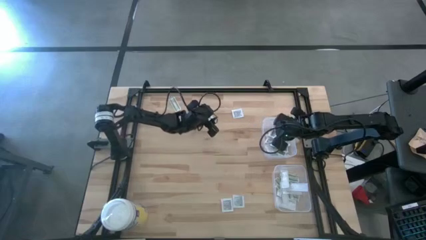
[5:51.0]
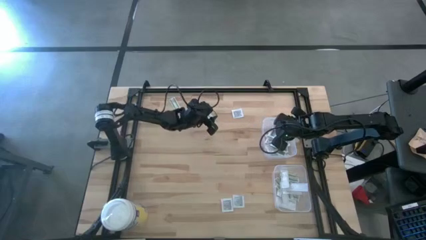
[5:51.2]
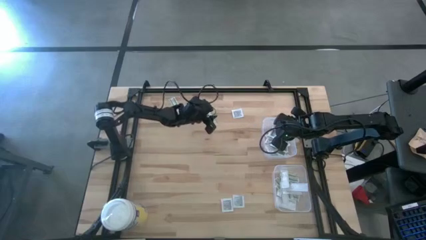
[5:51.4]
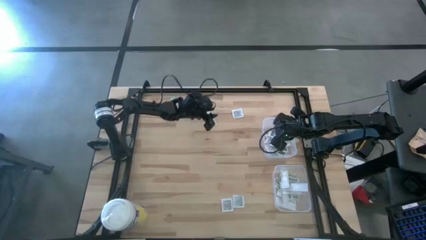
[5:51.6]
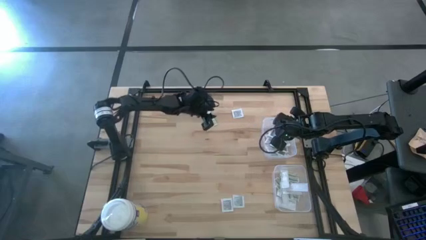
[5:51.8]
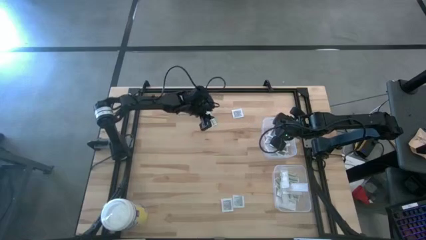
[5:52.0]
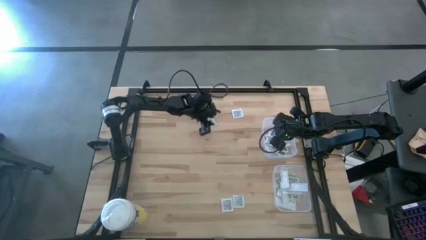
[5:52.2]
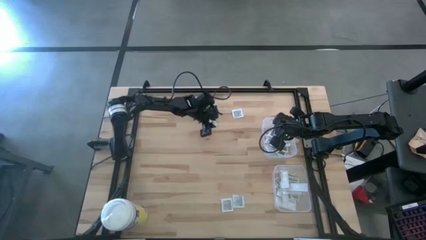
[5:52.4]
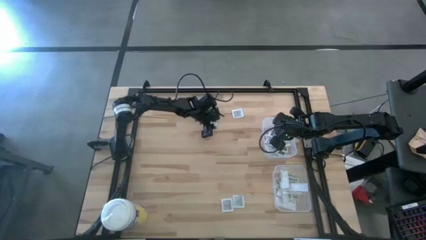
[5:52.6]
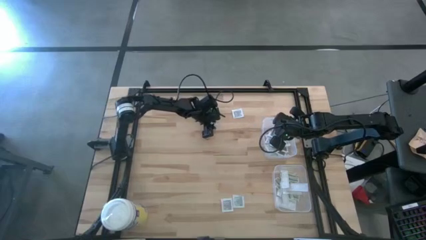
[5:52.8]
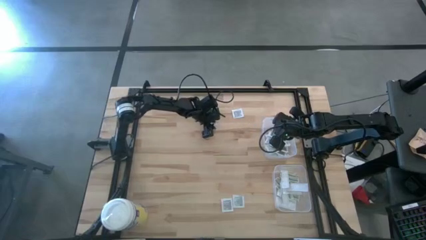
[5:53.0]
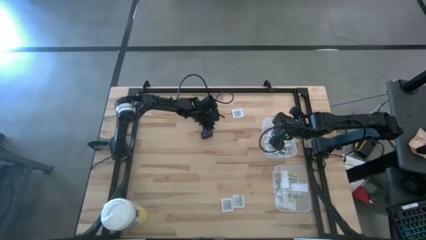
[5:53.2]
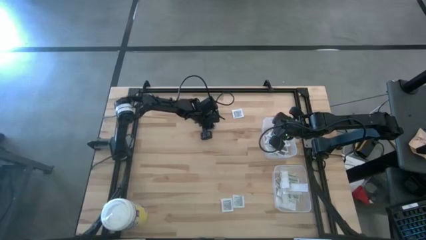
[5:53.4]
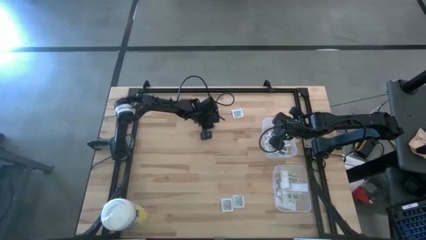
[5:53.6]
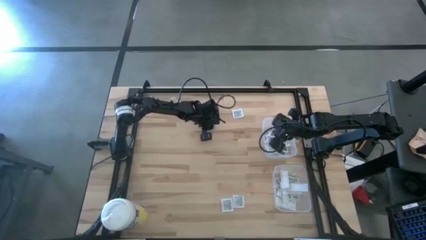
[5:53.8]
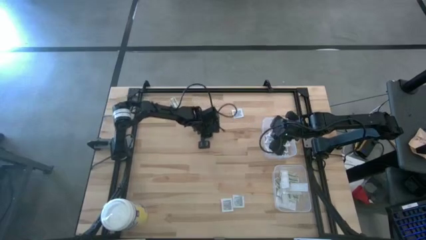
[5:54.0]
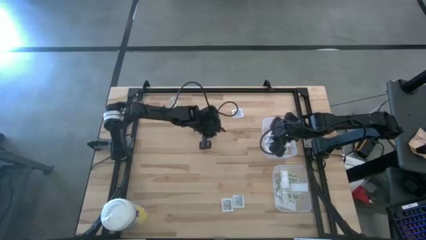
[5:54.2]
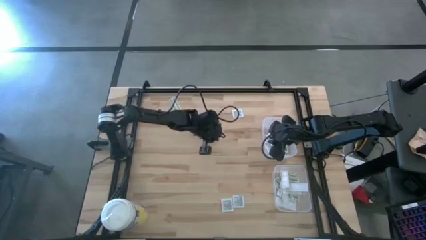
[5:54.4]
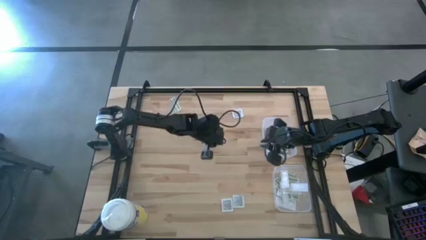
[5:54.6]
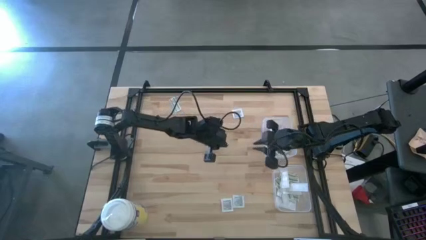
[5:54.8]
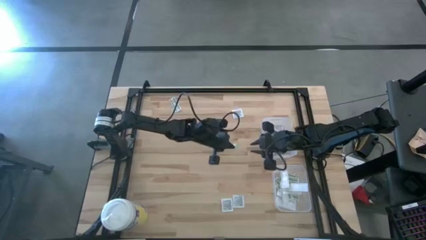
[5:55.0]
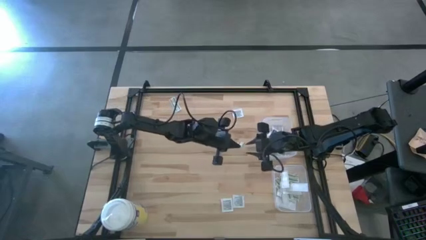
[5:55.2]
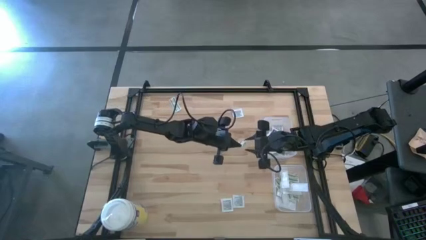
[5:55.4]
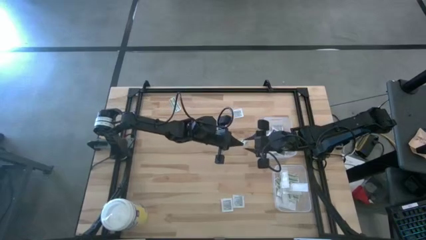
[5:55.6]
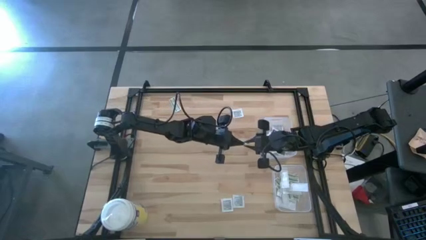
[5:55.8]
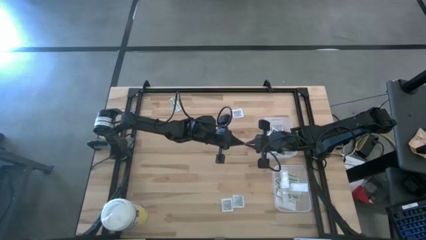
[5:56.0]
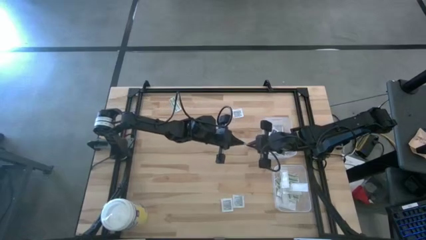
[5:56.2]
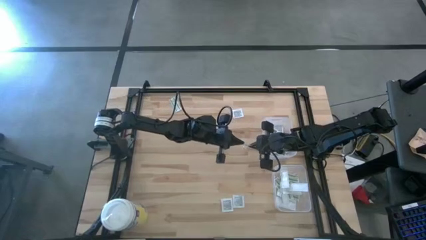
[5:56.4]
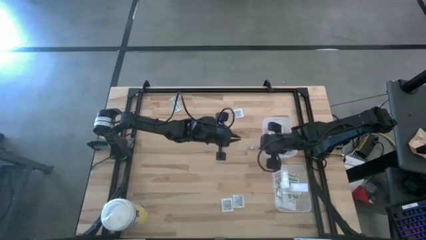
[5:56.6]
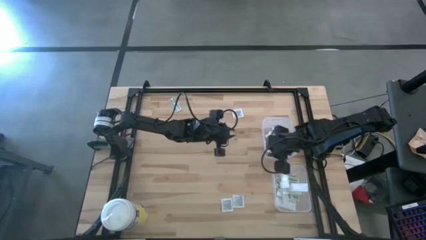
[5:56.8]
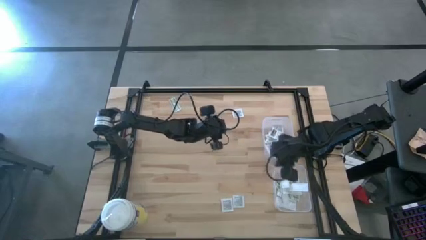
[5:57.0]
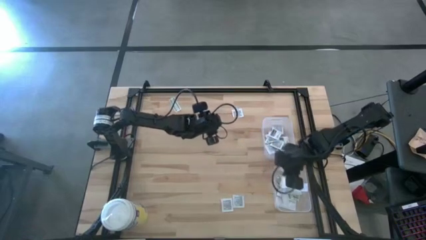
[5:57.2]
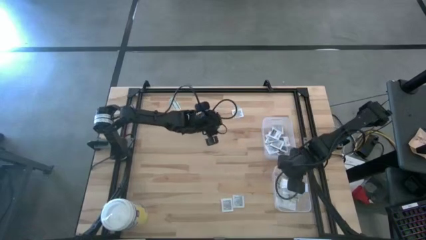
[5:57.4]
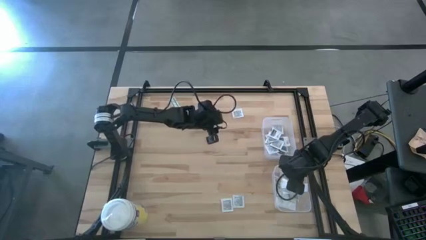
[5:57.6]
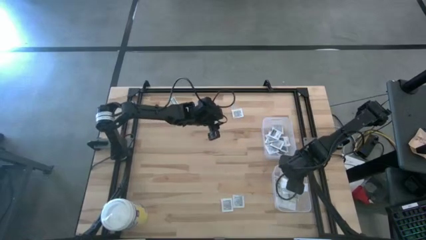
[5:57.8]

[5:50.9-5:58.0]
Task: Pick & Place First Aid Supplies
Put the right bandage pack into the bottom bin

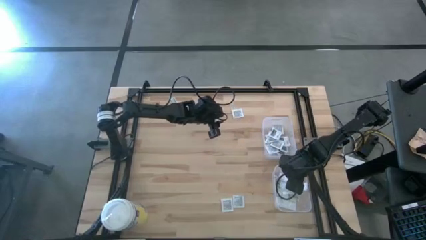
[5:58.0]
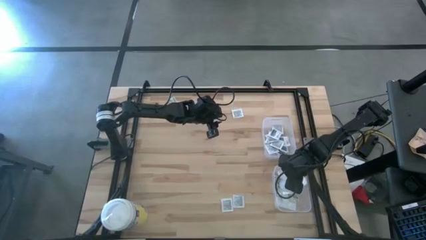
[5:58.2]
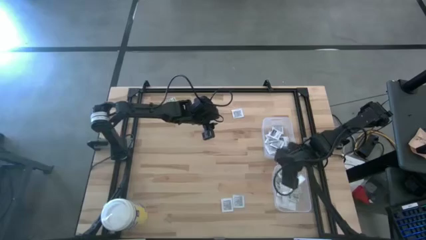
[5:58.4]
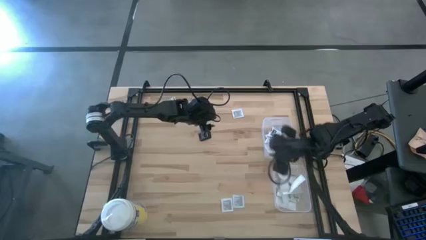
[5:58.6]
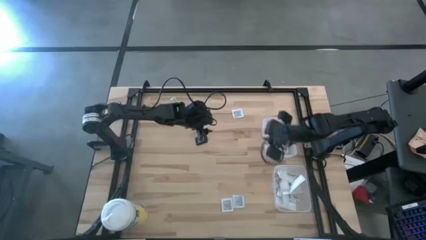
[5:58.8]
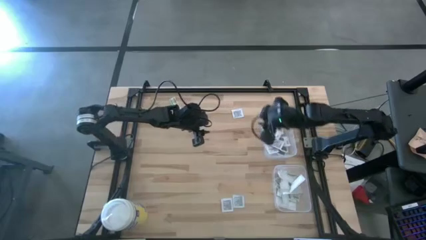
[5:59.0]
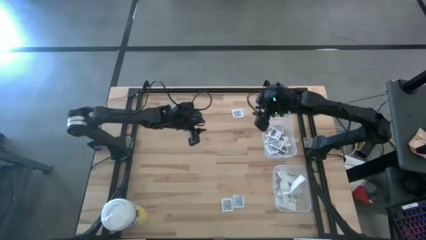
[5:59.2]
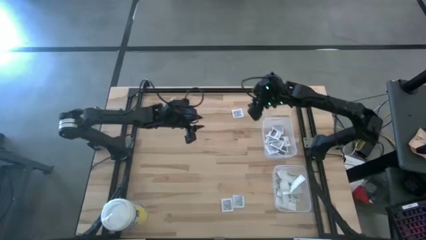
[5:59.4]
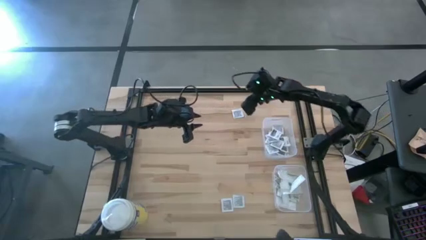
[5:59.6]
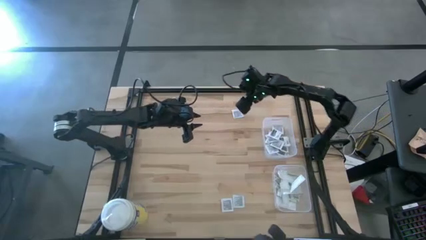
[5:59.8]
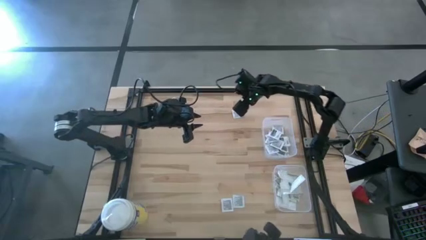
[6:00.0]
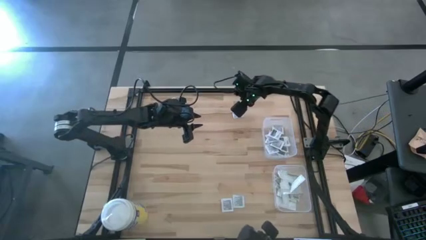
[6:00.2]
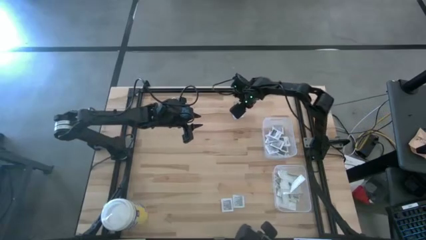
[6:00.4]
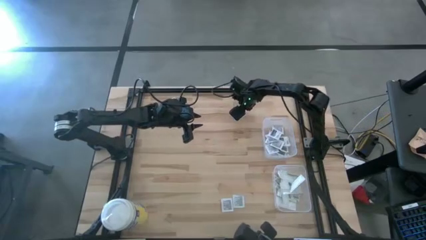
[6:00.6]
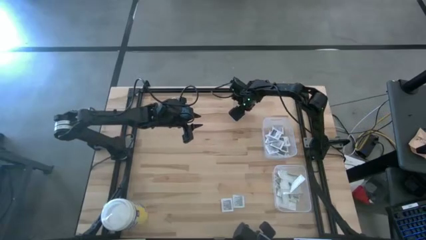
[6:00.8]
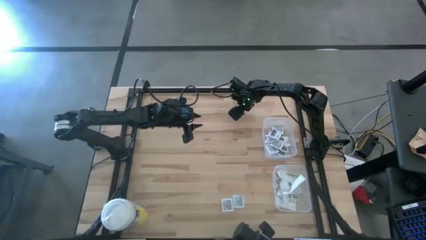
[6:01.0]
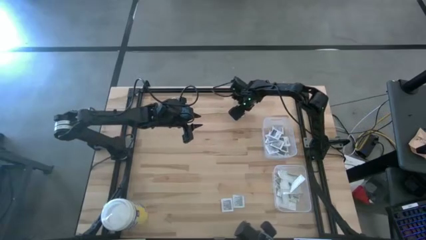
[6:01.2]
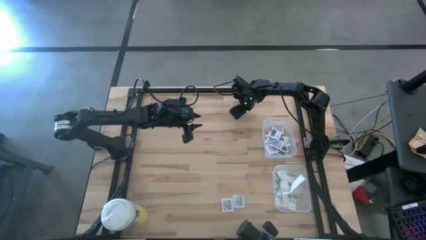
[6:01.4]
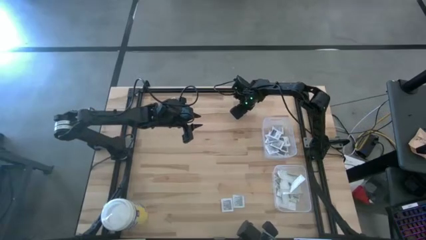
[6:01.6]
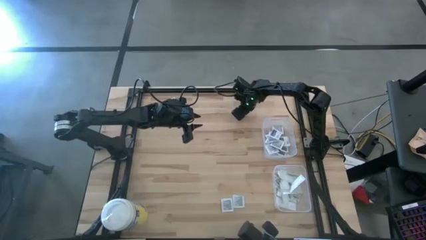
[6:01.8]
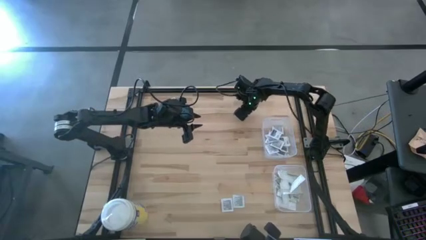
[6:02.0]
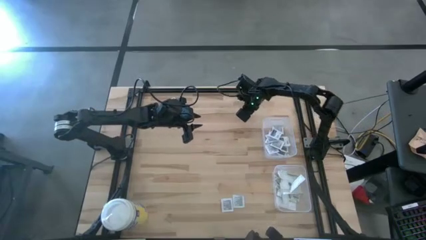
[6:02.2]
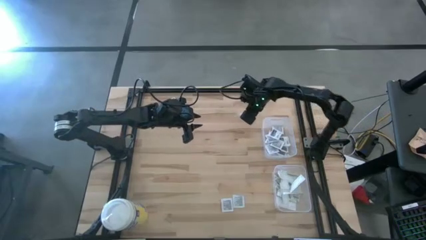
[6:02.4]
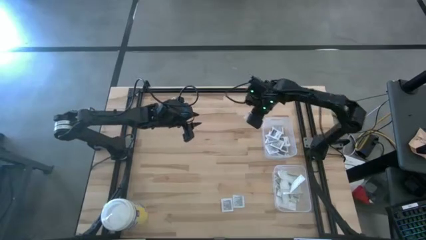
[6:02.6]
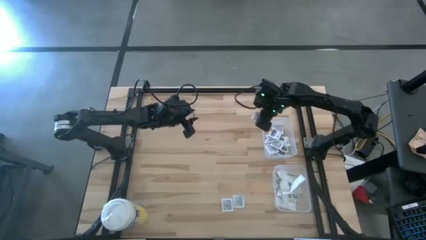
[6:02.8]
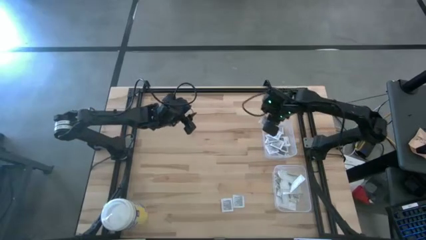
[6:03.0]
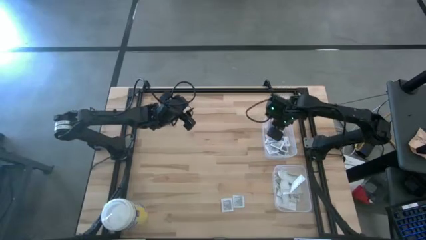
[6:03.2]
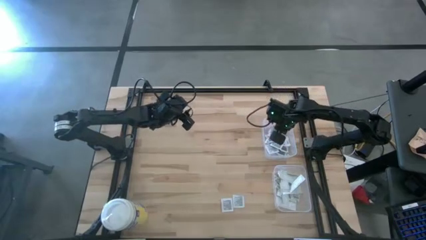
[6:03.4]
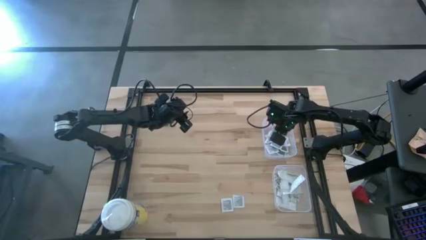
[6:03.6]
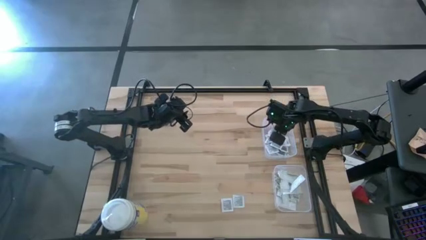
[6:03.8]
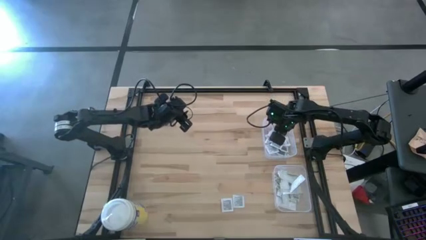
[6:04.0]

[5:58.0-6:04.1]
Put the top towelette pack into the top bin

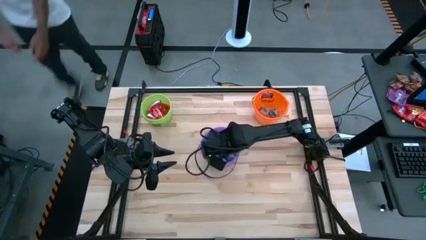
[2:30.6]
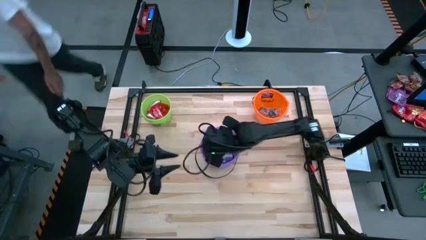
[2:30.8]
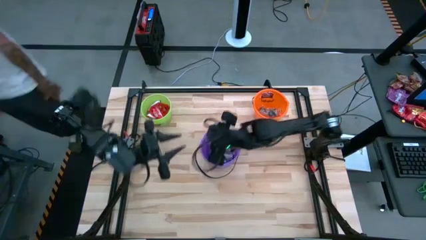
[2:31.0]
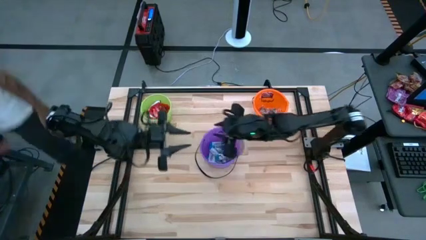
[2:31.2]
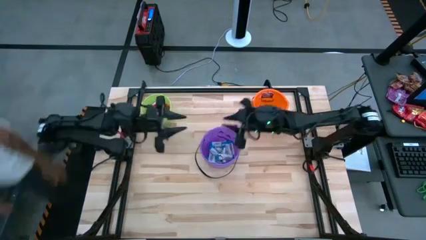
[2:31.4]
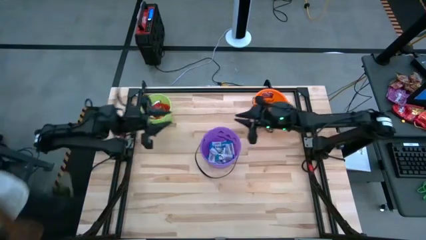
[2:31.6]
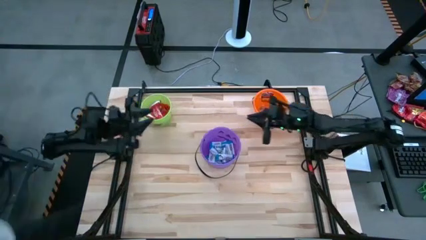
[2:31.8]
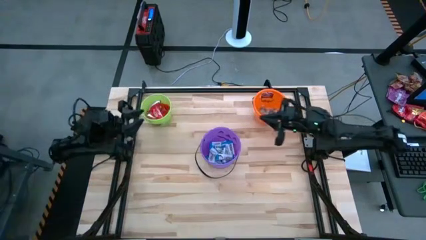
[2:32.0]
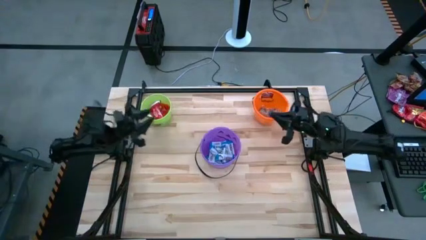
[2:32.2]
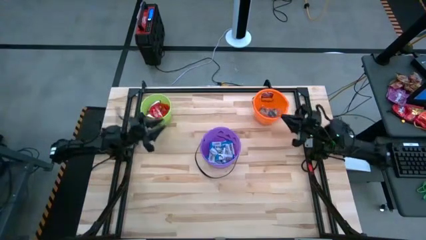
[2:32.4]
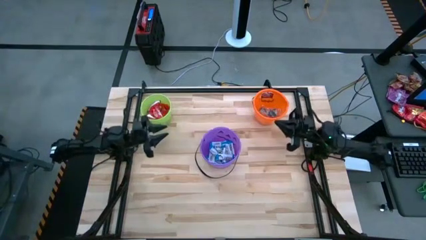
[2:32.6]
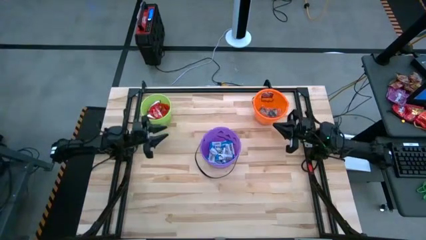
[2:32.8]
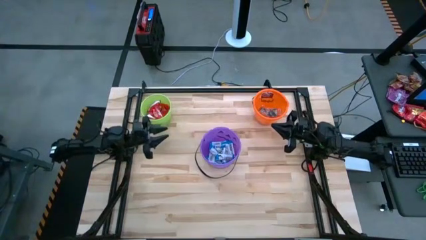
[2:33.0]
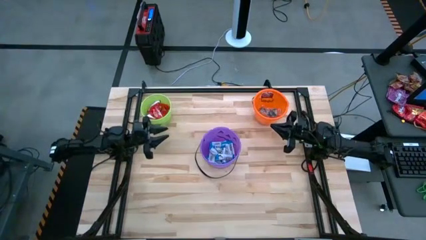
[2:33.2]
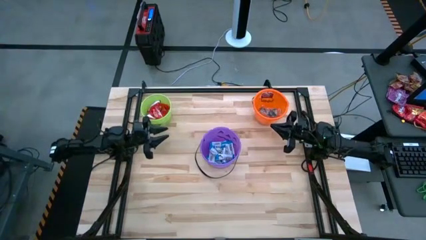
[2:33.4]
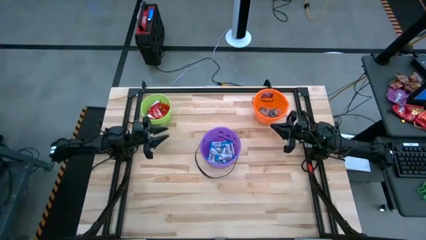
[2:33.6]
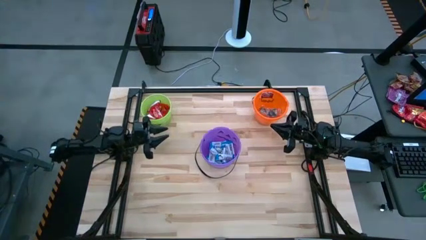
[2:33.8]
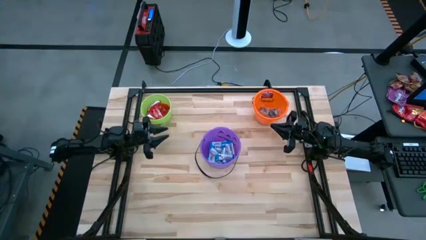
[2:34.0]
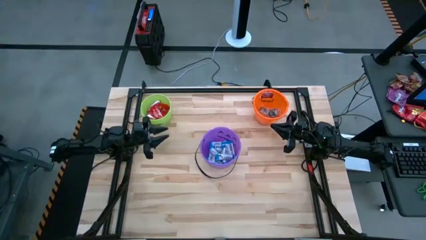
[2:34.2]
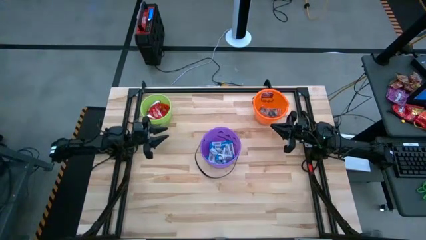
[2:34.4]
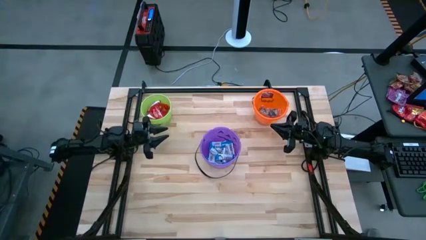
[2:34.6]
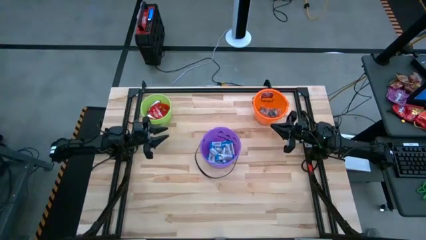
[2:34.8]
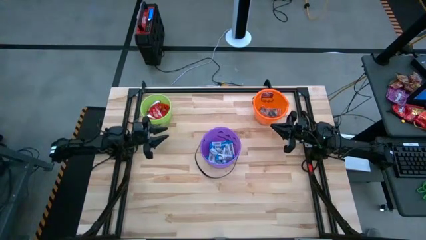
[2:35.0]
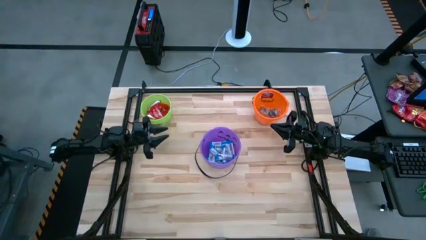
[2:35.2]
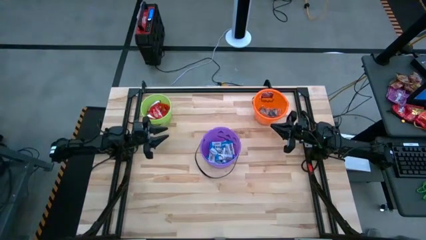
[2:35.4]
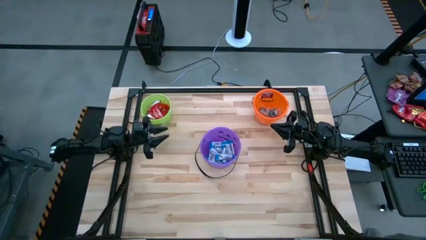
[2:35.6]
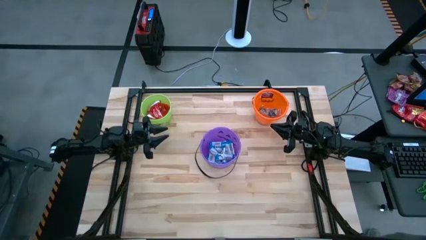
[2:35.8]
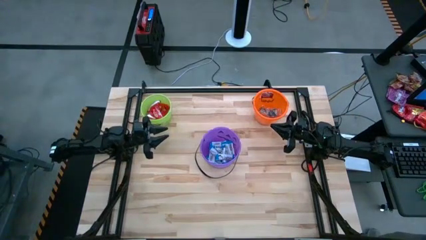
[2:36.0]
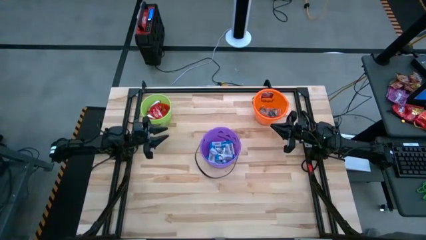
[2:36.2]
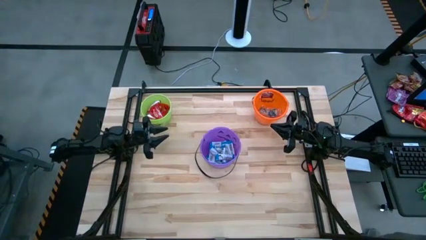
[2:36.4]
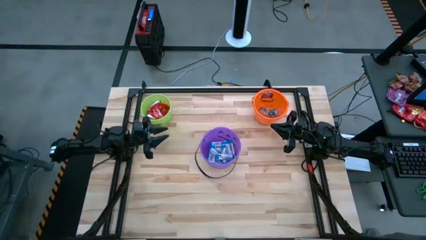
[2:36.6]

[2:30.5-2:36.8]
Task: Sort candy by brand, put in halloween buckets
Return to Home Position
